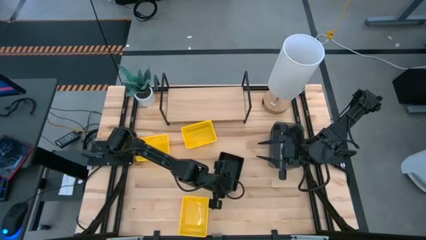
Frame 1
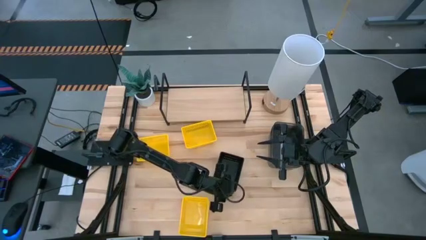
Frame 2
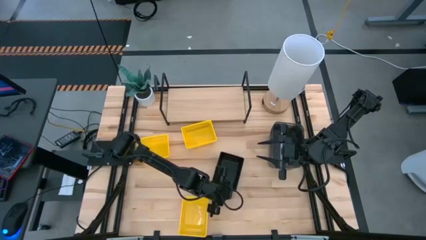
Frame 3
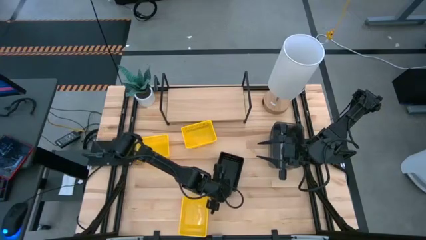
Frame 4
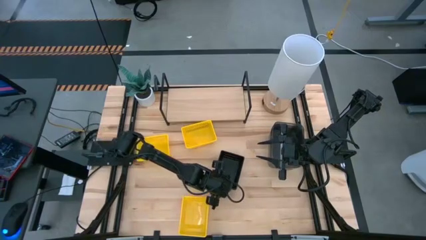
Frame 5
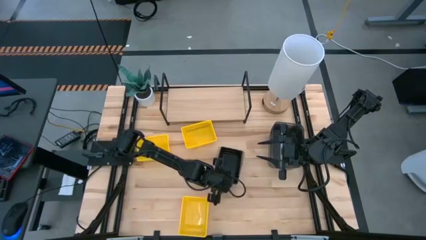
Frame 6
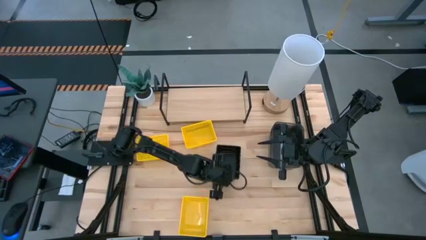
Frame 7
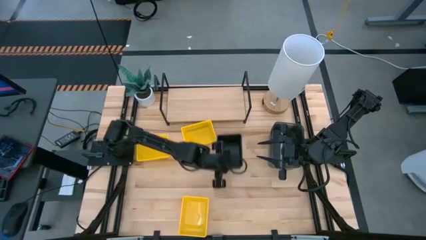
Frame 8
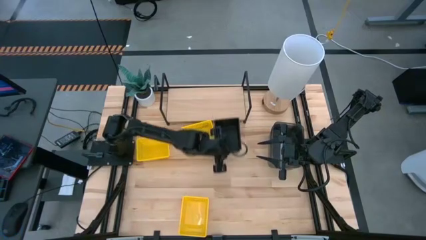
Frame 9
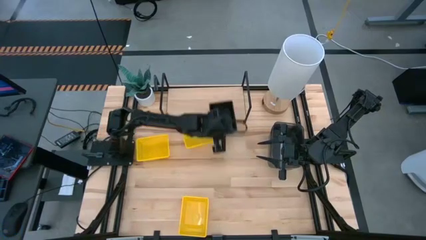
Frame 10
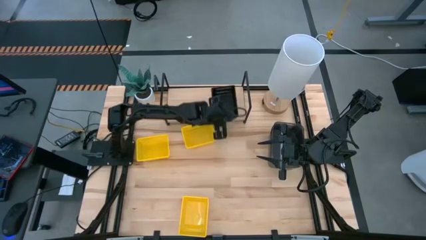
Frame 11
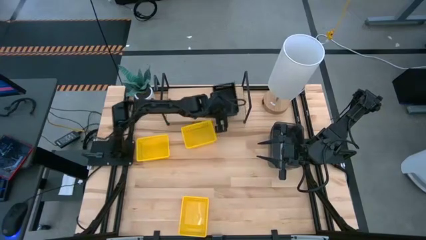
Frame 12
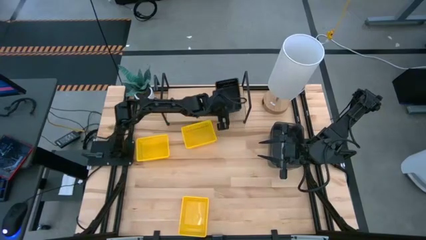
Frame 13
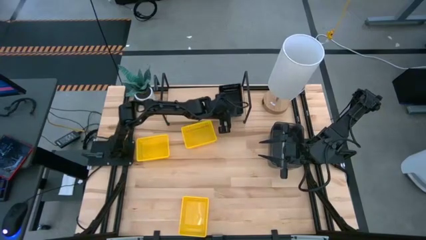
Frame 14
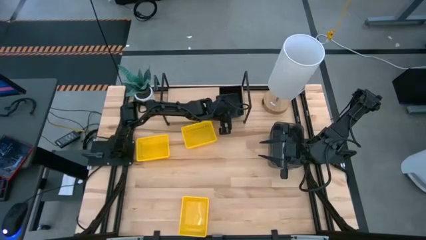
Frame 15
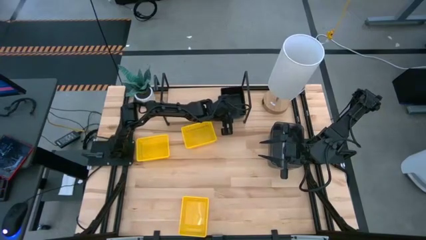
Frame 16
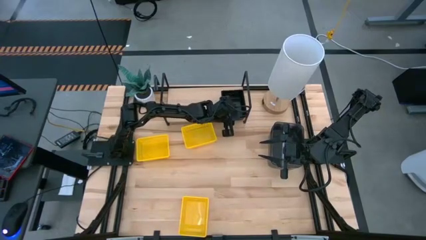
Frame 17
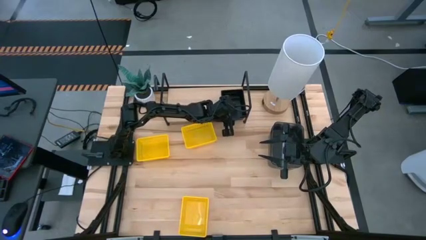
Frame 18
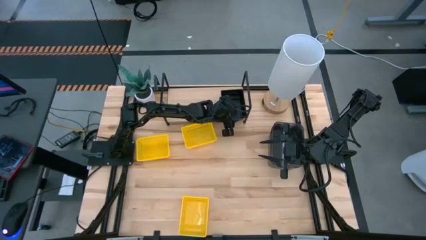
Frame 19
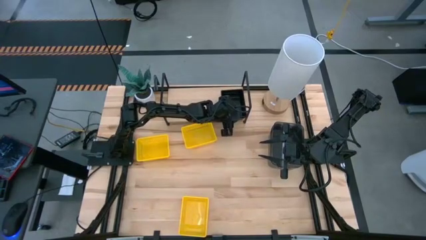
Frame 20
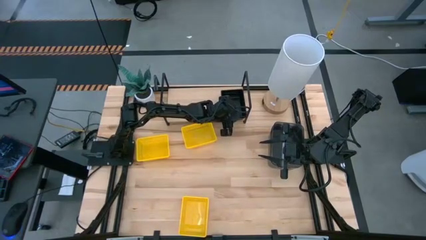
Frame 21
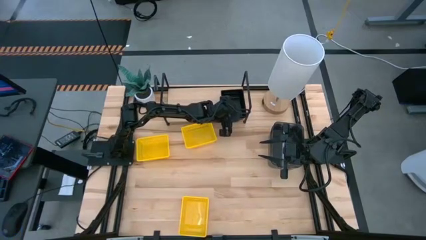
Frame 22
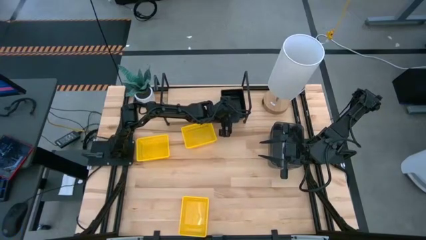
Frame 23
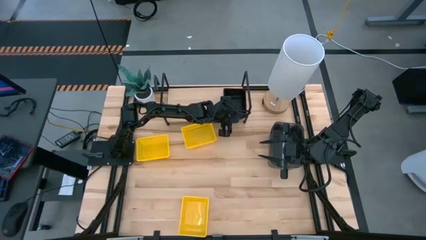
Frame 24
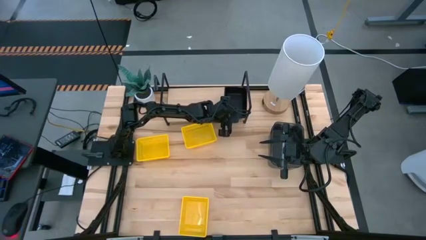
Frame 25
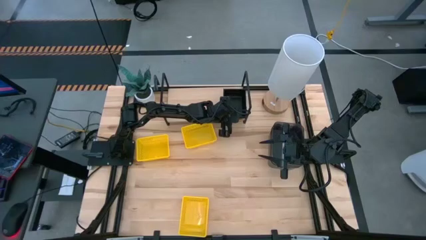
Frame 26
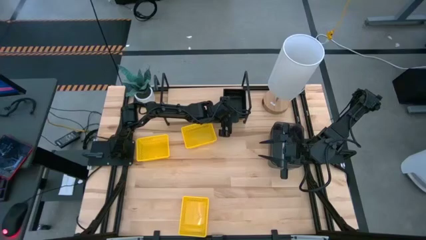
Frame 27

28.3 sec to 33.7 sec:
Task: Stack baskets on shelf by color
Put the stacked black bins on the shelf

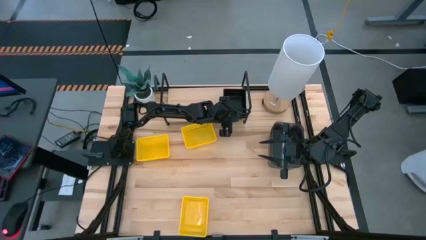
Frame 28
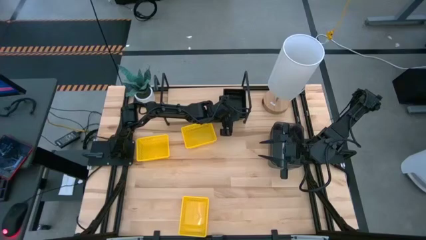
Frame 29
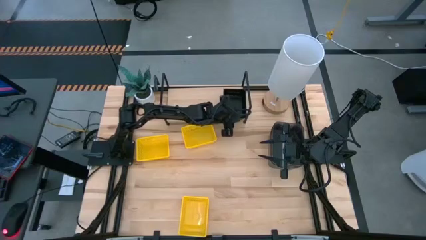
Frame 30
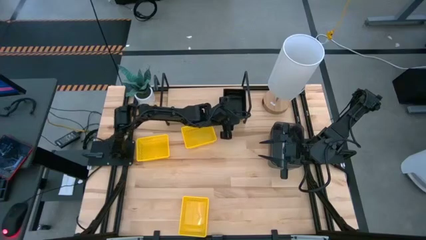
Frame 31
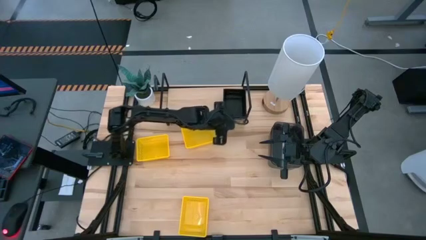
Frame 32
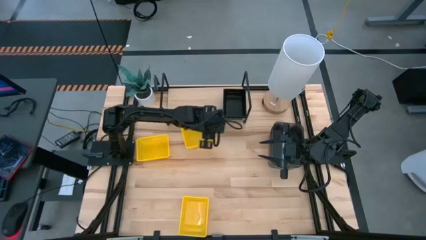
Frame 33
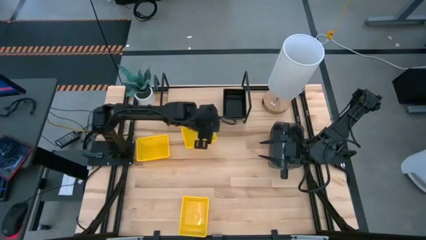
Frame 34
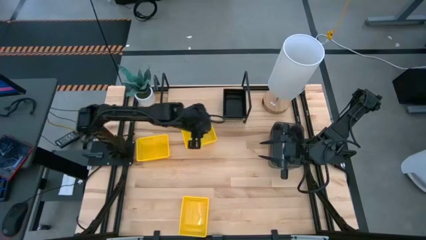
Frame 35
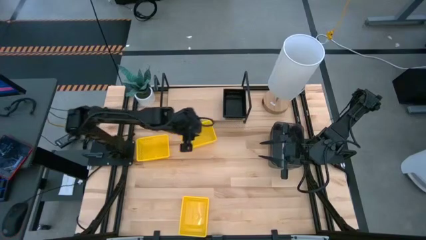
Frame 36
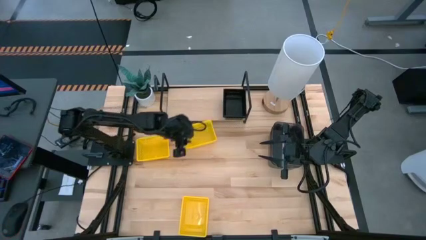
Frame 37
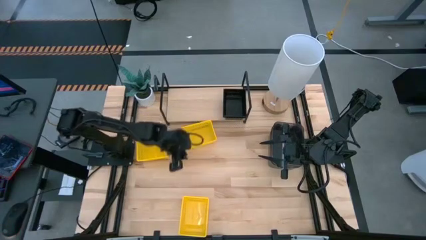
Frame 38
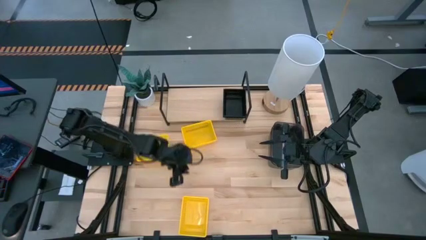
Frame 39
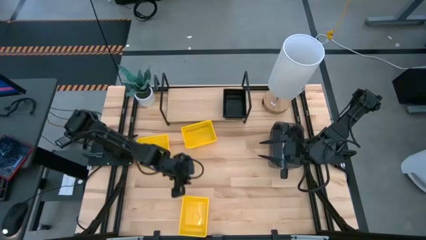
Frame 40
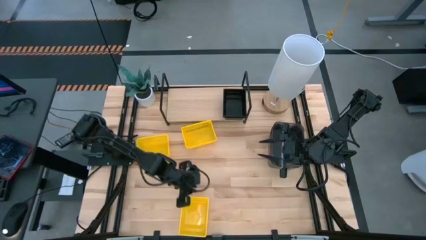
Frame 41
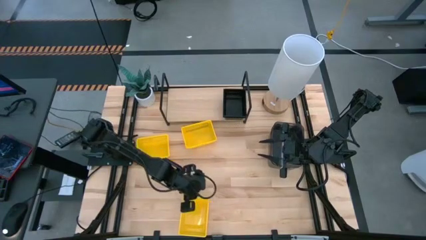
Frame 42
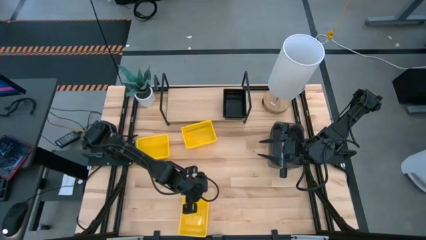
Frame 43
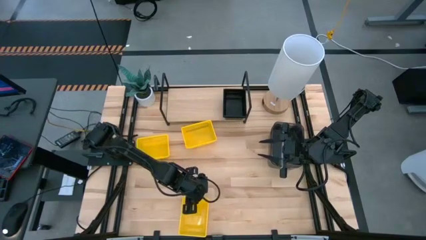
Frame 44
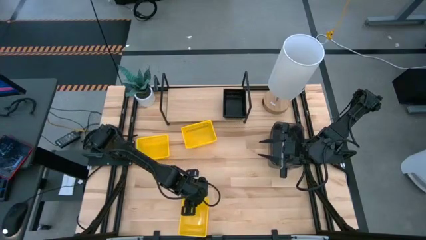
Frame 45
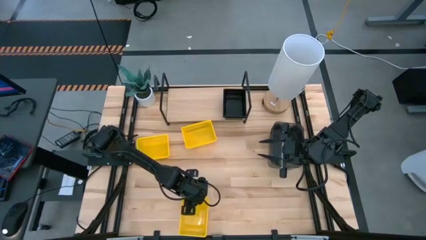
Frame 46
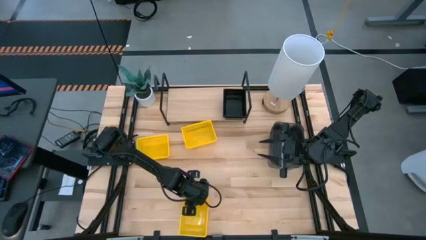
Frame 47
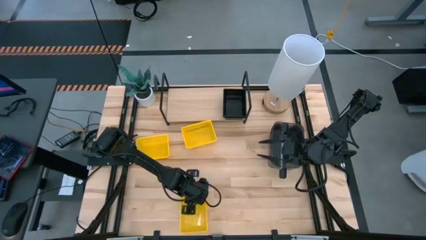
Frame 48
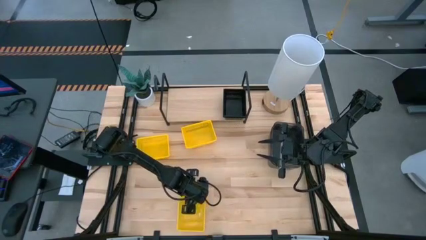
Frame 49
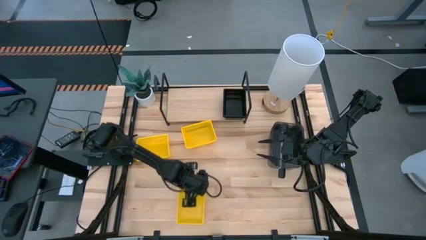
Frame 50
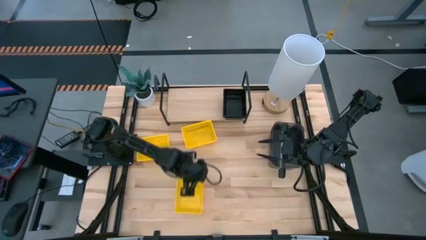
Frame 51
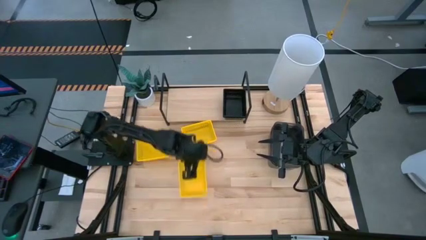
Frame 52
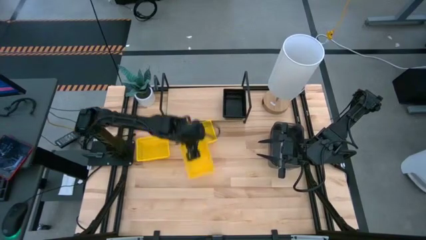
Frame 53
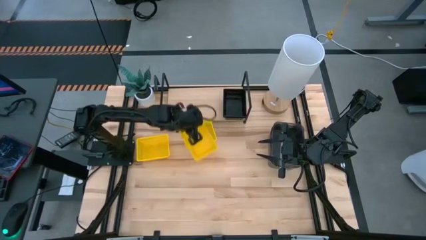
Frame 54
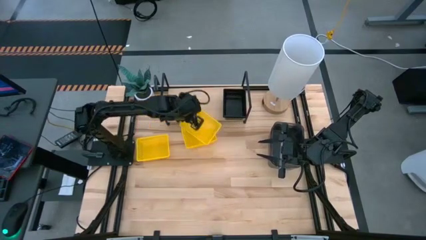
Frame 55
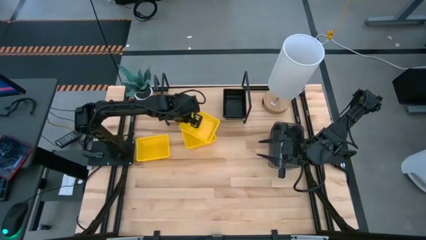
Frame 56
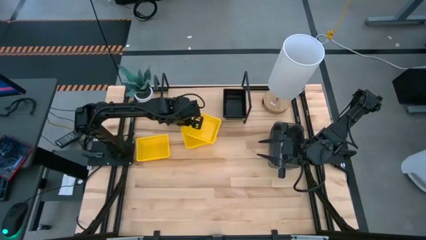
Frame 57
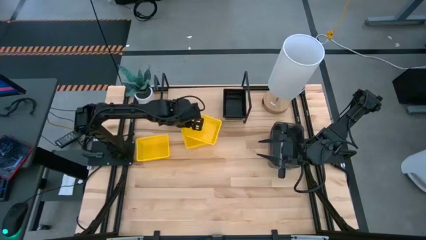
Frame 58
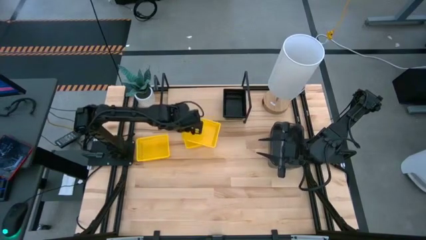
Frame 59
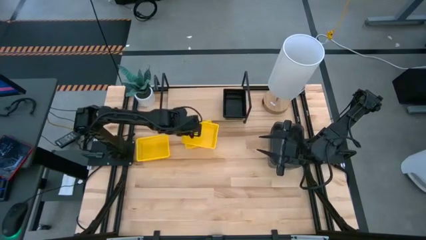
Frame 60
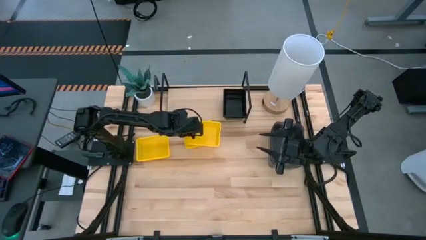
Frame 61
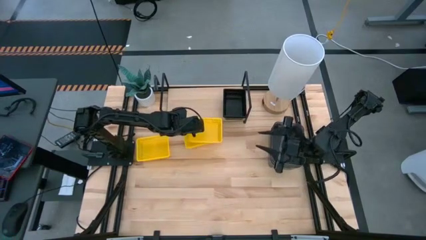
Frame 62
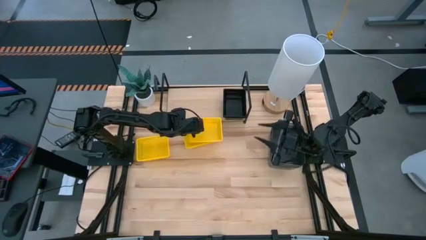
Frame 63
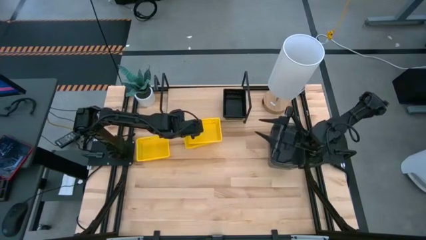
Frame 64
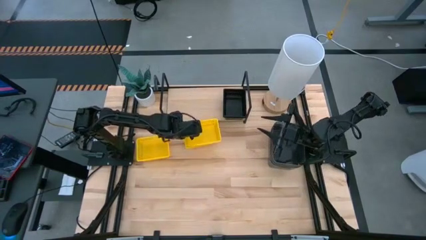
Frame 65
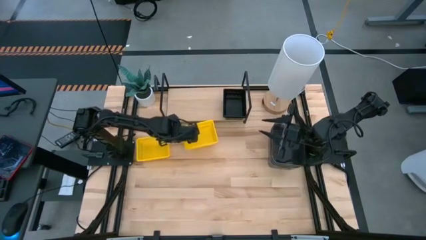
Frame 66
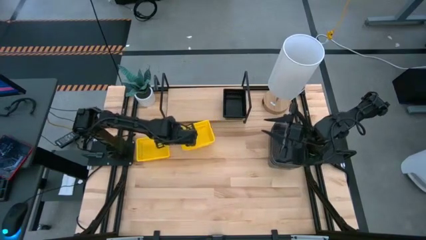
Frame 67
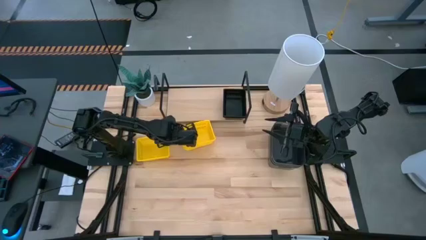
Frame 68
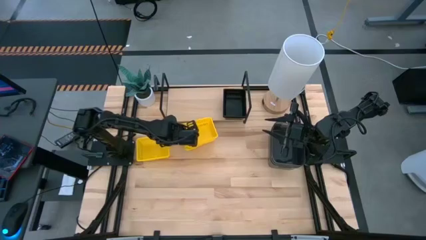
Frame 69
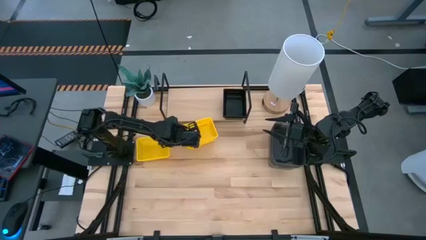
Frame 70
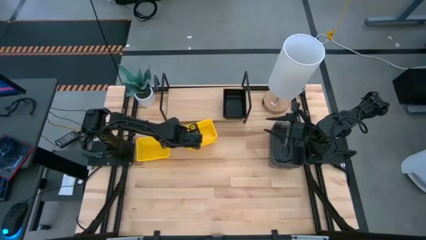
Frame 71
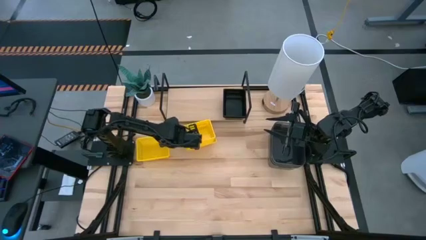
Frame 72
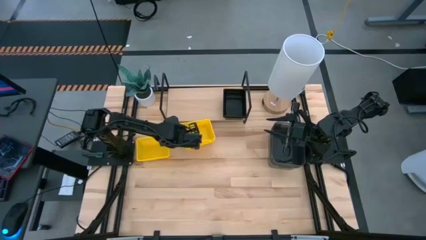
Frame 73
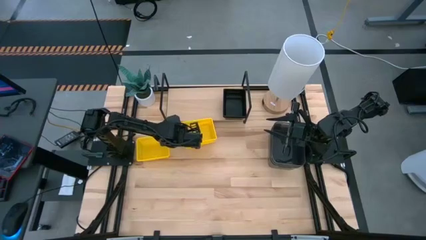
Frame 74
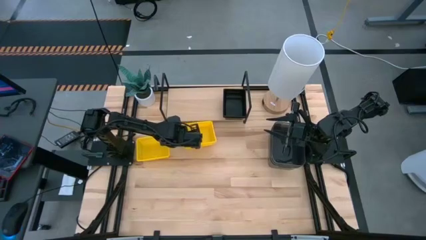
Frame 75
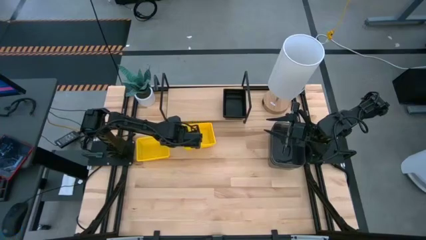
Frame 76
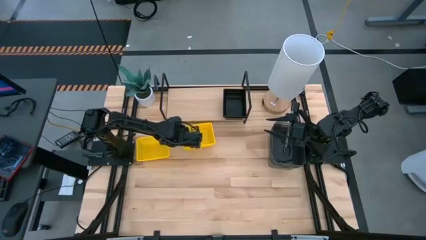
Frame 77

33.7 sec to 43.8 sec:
Stack the bottom yellow bin on the top right yellow bin
